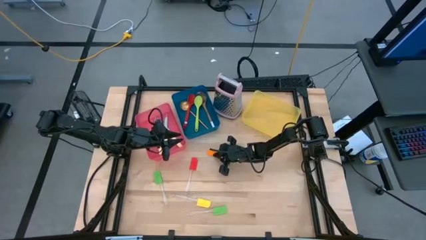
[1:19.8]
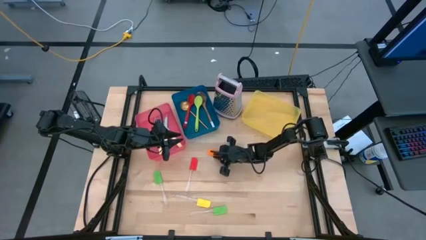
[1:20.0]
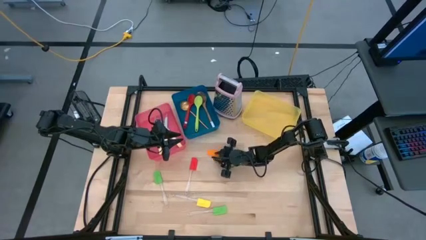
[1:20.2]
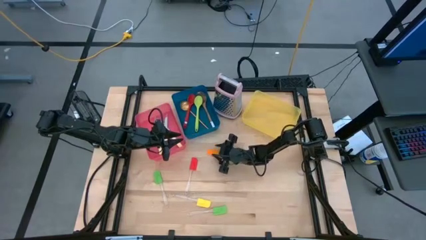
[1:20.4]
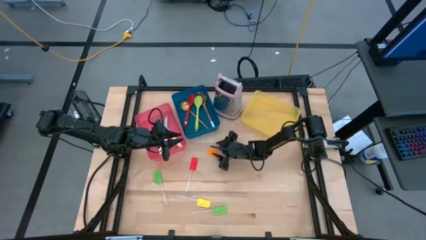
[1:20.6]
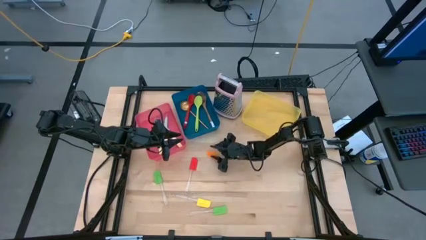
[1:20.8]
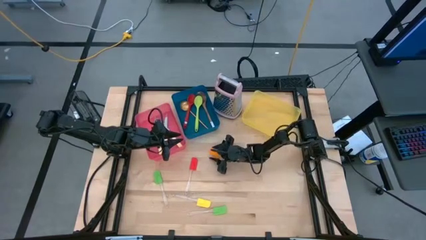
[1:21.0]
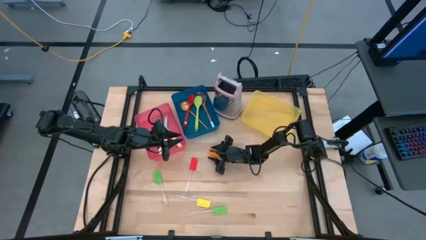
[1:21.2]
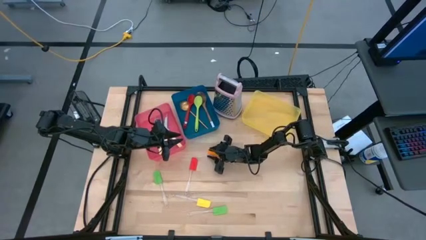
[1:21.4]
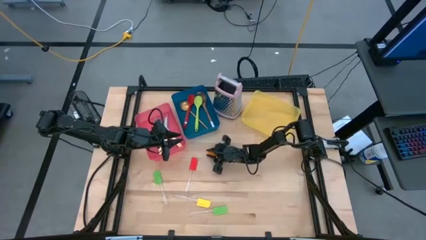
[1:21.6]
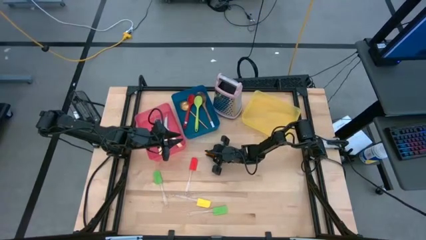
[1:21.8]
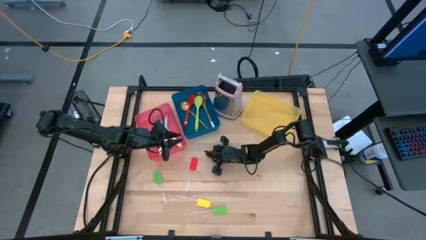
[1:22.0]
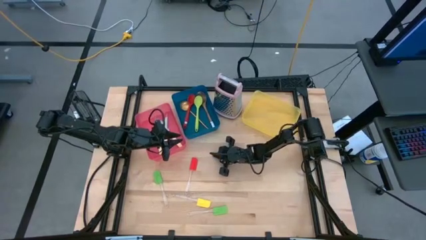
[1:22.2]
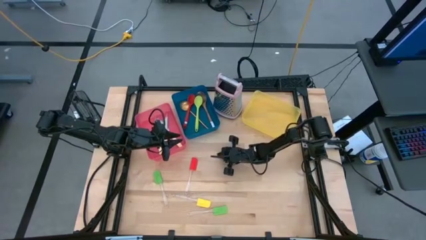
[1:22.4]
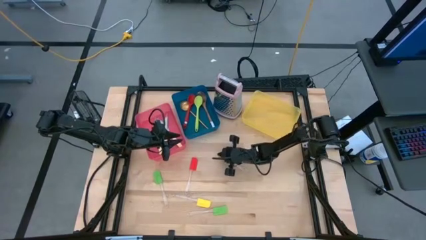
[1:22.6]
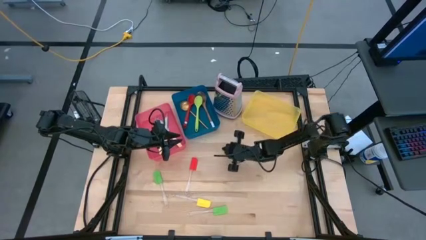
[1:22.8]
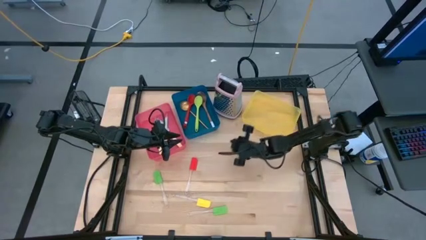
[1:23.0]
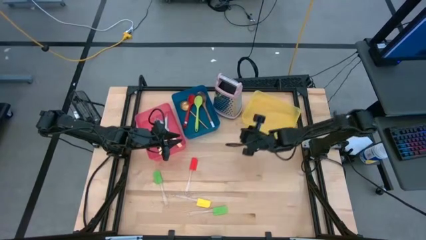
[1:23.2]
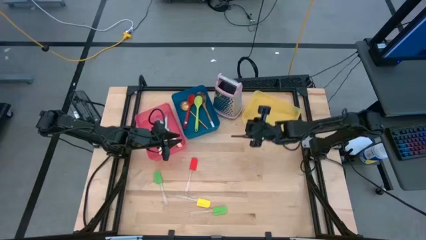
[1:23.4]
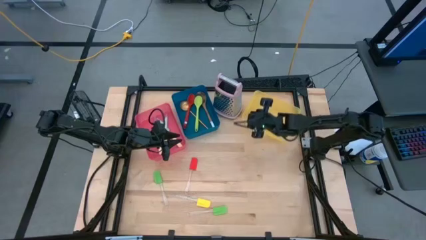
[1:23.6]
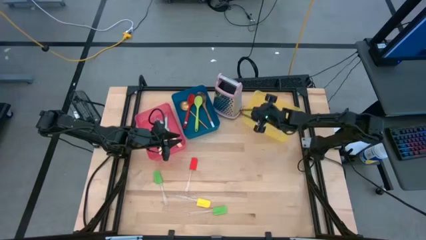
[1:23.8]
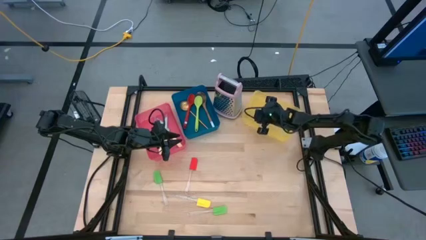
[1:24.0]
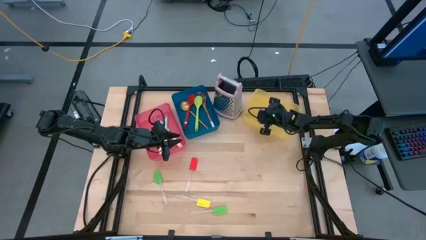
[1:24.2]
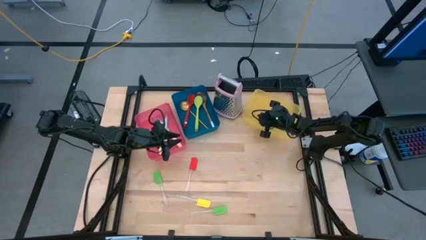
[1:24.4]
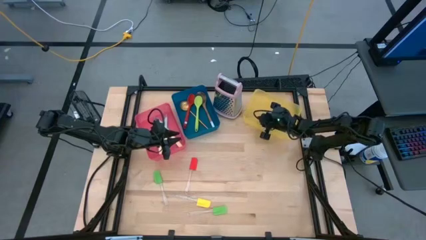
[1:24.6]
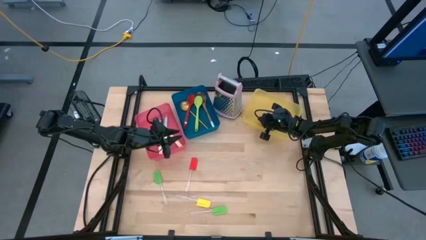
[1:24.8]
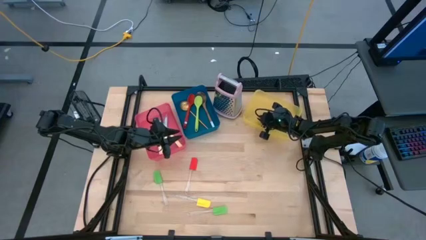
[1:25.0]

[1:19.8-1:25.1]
Task: Pick & Place Kitchen Items
Put the orange spatula into the yellow bin

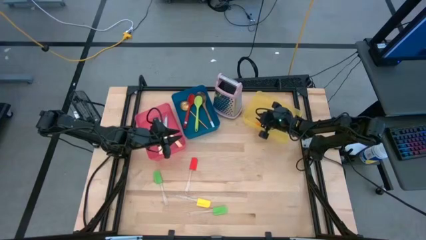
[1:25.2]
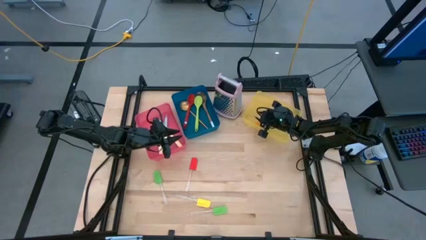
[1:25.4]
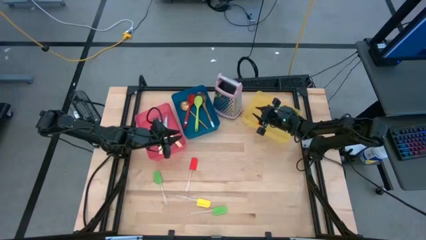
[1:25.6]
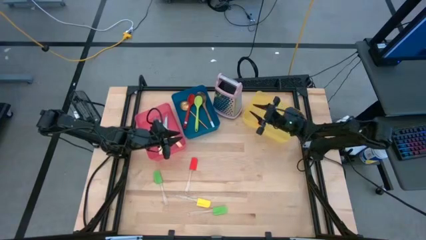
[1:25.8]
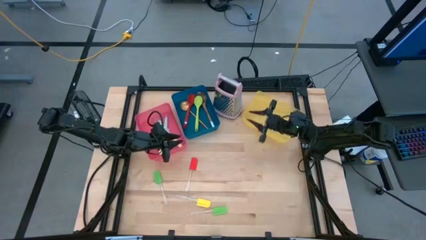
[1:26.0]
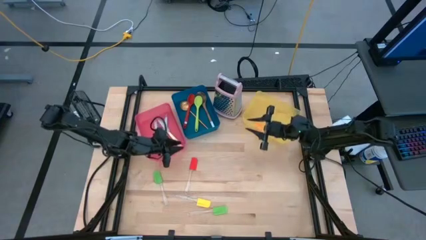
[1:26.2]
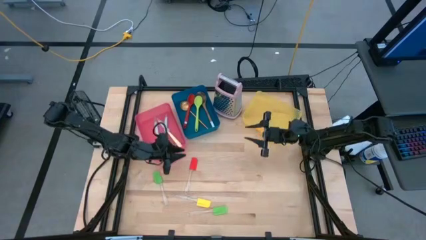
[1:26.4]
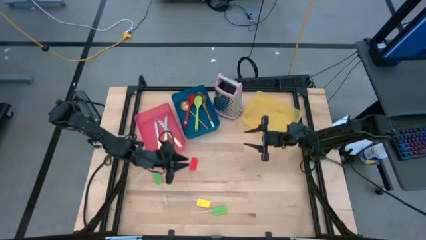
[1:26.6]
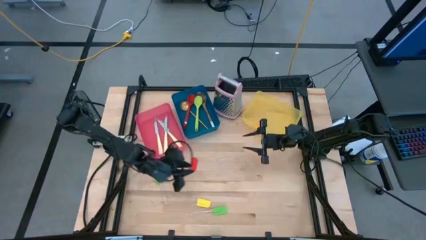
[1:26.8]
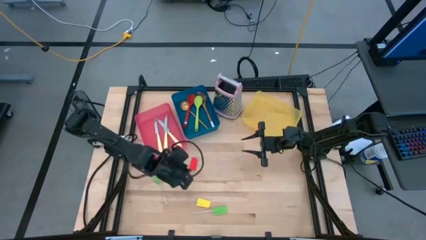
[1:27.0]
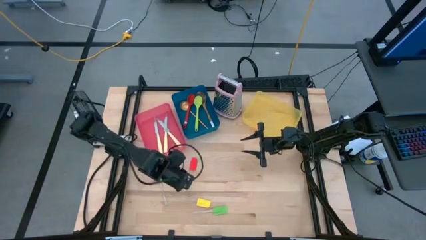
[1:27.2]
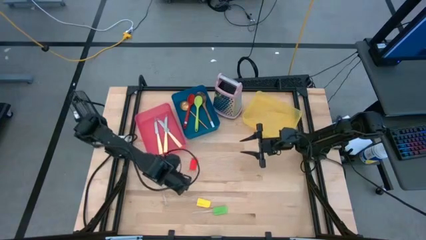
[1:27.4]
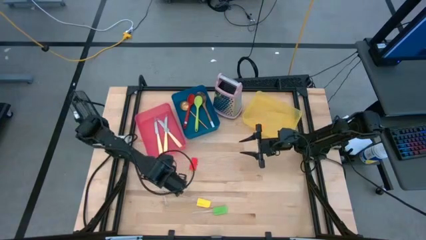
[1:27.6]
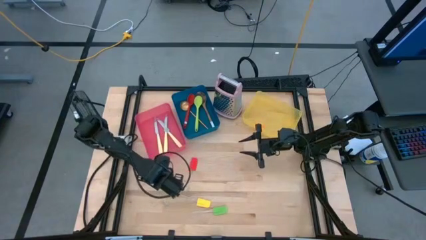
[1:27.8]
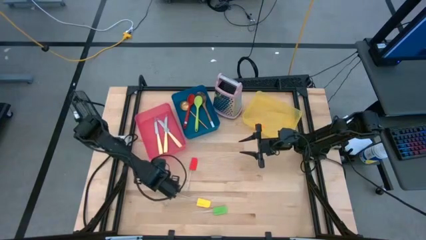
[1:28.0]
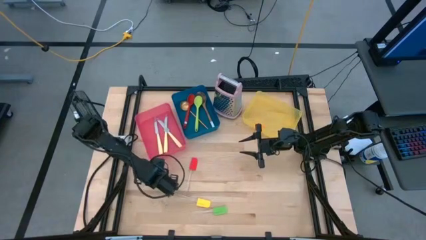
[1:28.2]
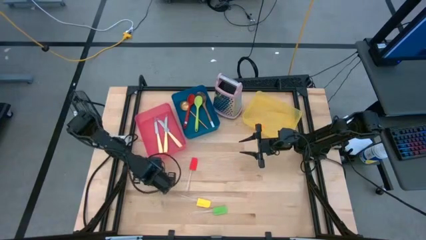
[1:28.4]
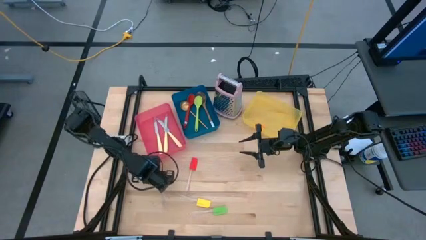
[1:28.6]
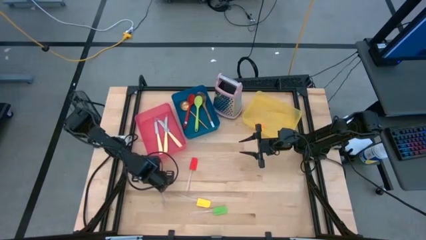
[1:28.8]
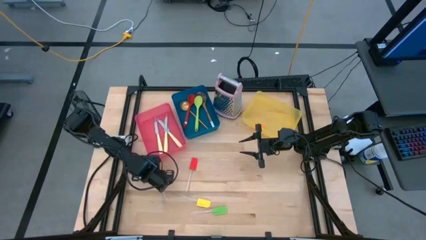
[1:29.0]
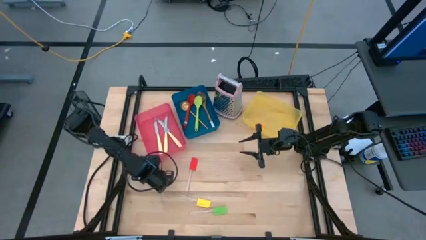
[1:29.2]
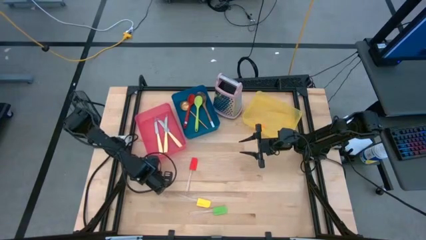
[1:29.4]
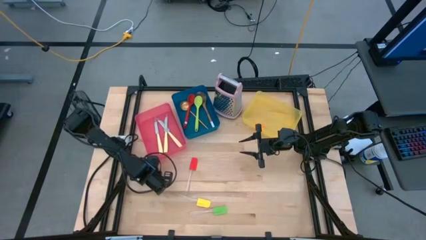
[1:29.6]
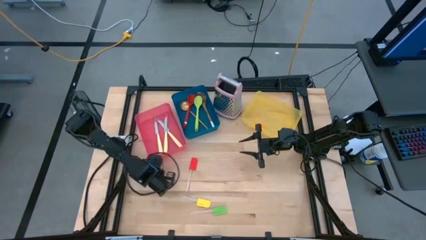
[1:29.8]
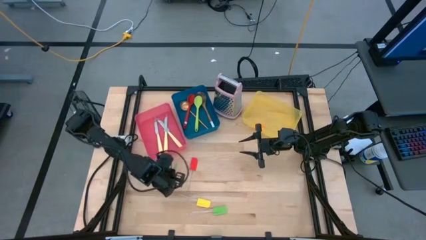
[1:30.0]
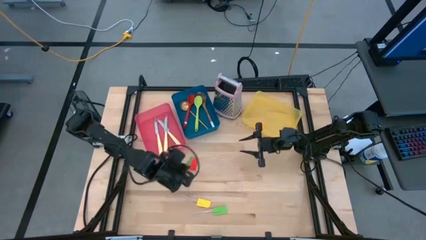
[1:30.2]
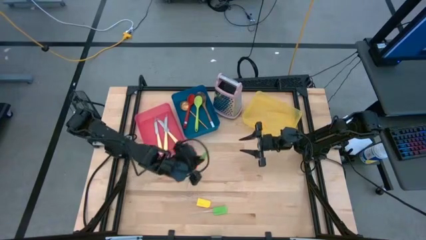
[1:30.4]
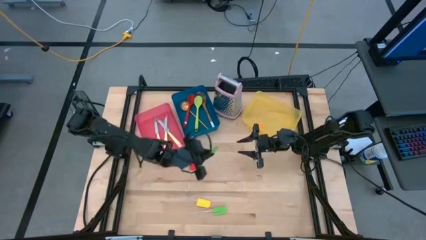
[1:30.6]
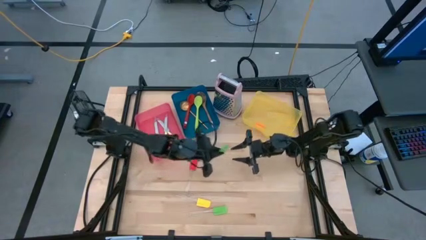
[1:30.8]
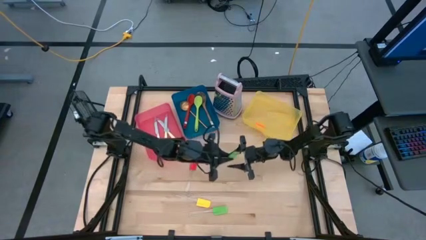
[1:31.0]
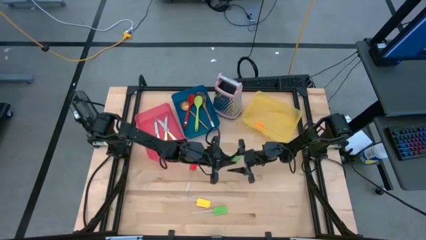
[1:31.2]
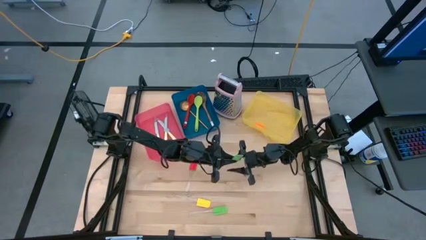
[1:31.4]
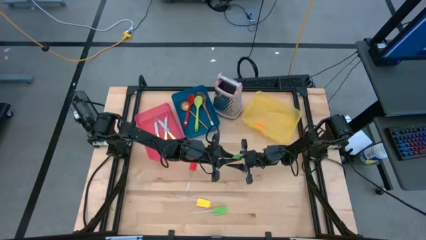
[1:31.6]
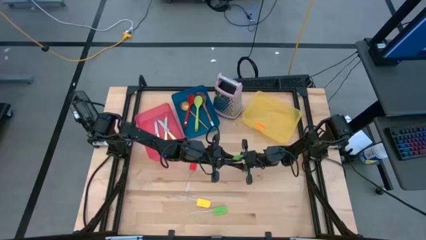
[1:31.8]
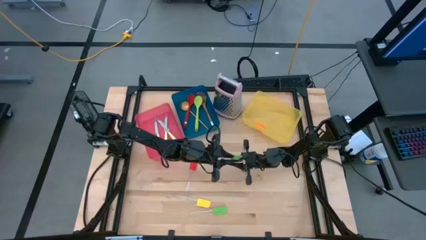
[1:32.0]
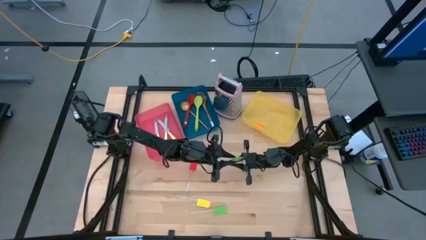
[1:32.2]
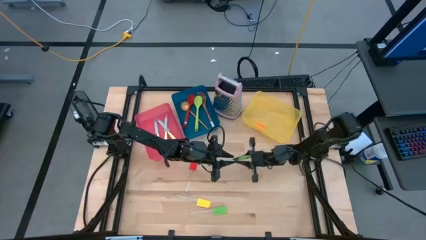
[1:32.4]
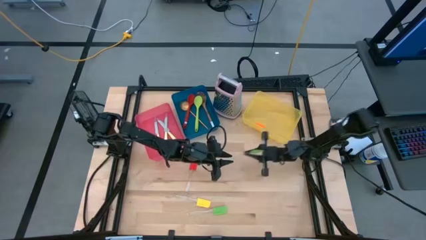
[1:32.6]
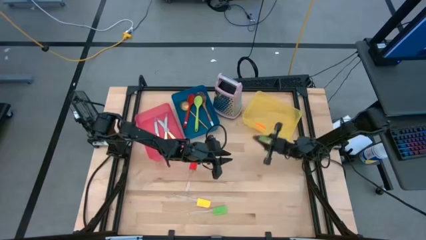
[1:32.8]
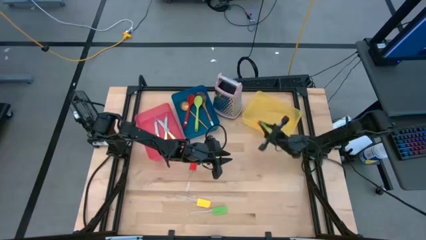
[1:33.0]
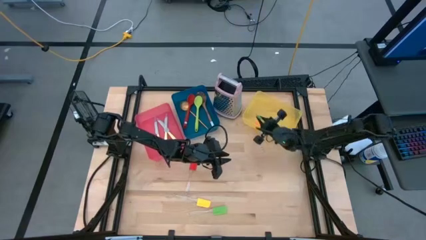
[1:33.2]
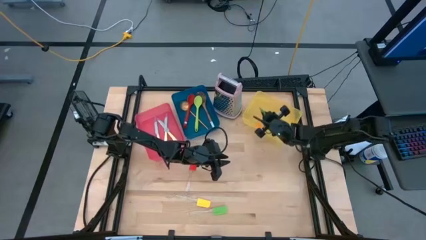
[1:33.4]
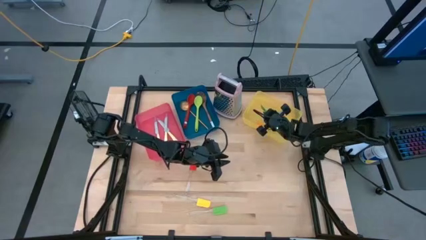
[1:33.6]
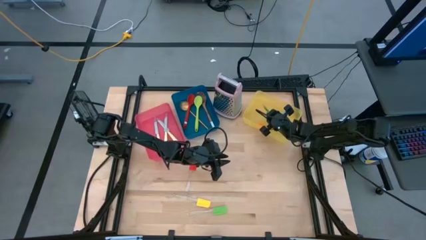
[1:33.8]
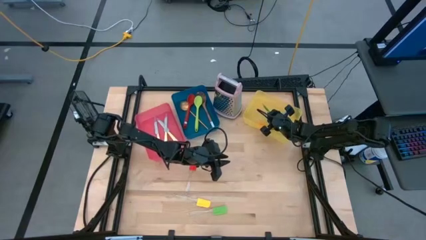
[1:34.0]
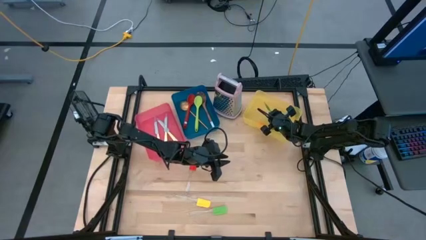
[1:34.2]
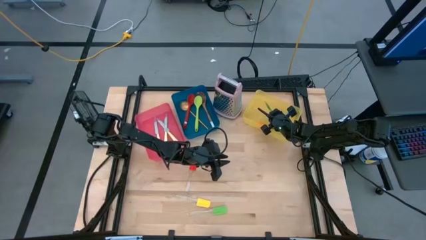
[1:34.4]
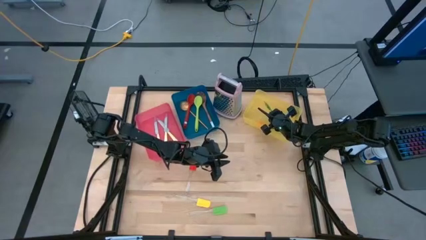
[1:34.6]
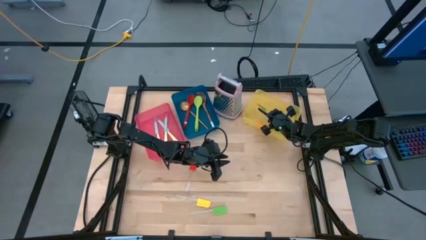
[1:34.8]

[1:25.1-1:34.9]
Put the left green spatula into the yellow bin
